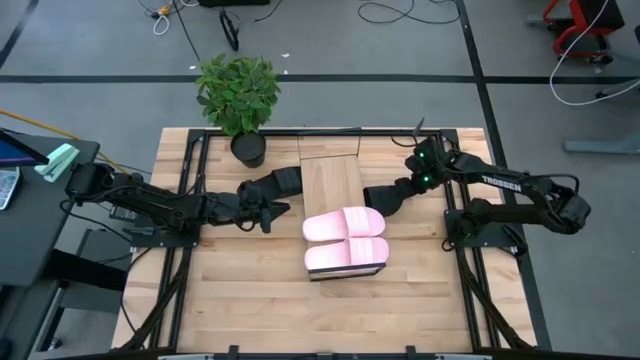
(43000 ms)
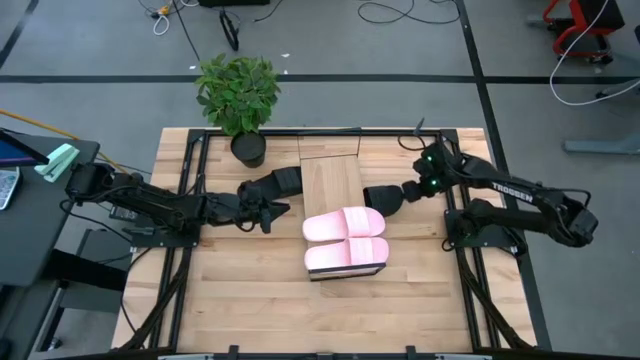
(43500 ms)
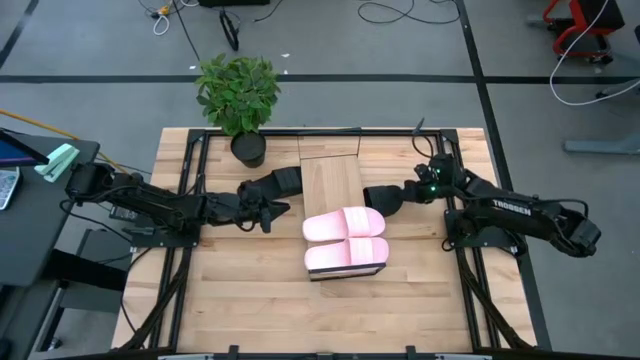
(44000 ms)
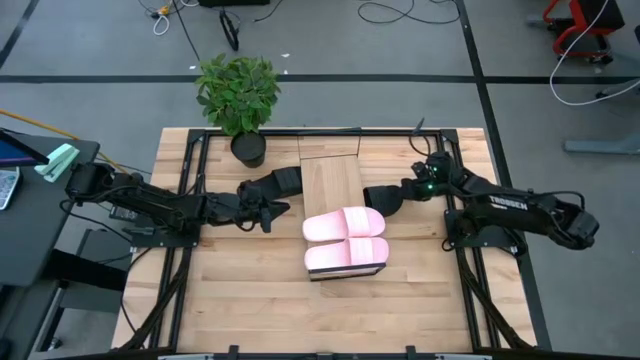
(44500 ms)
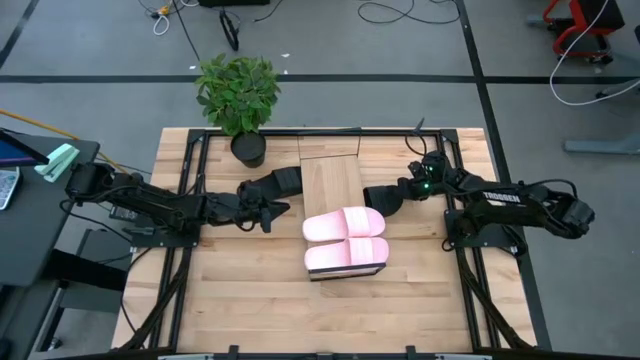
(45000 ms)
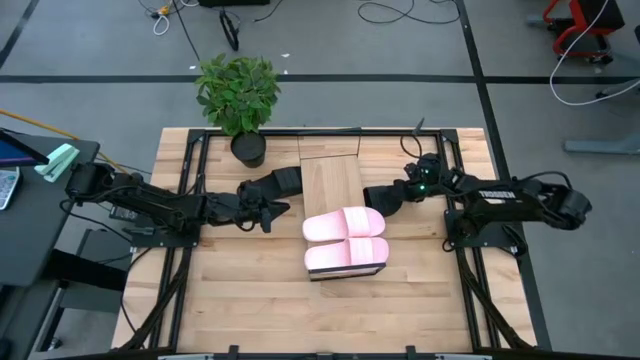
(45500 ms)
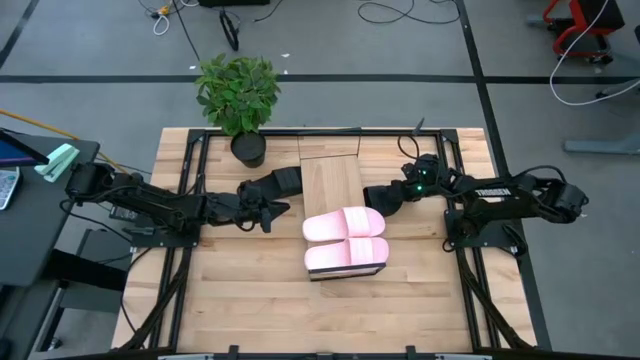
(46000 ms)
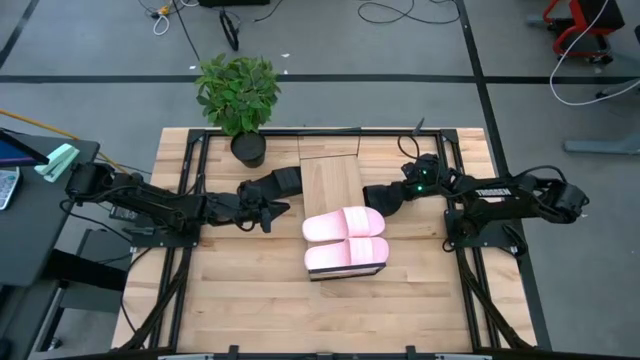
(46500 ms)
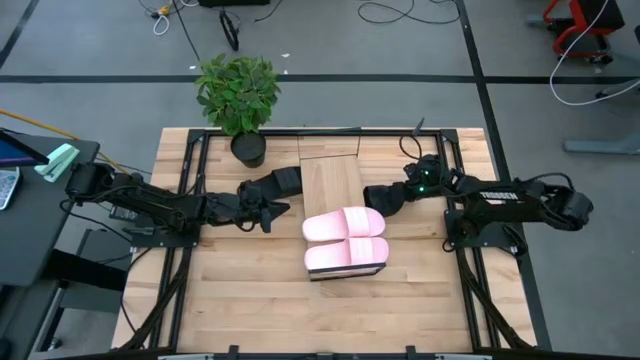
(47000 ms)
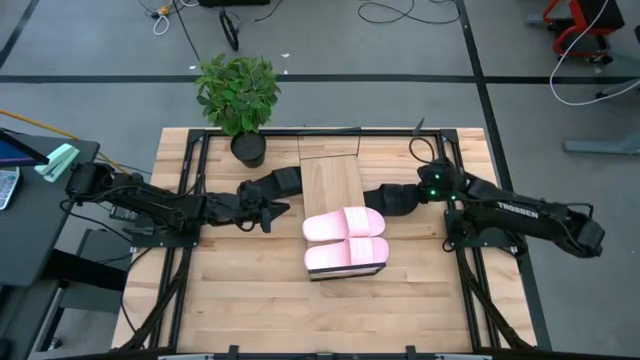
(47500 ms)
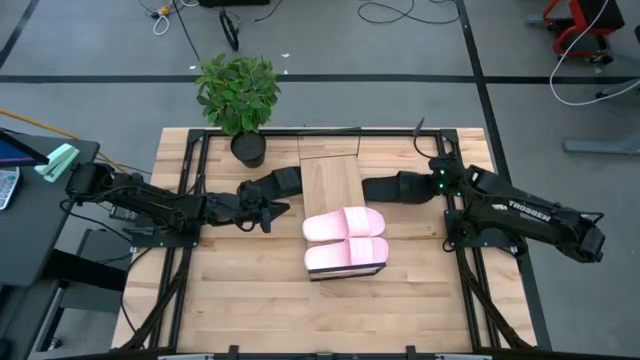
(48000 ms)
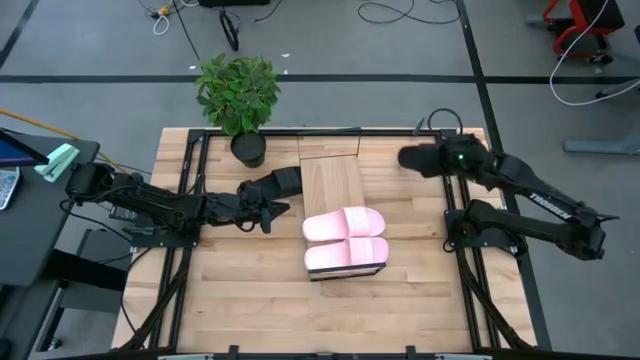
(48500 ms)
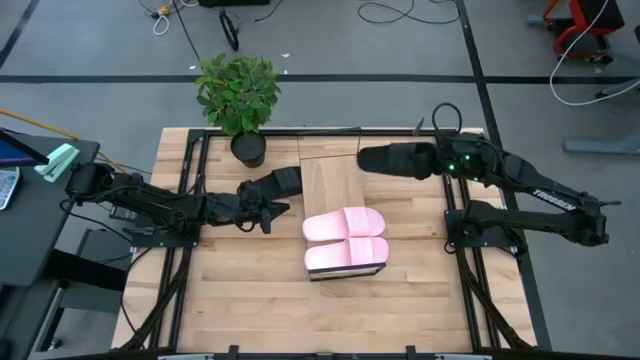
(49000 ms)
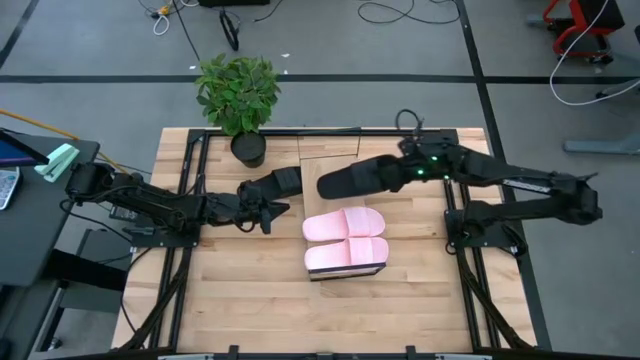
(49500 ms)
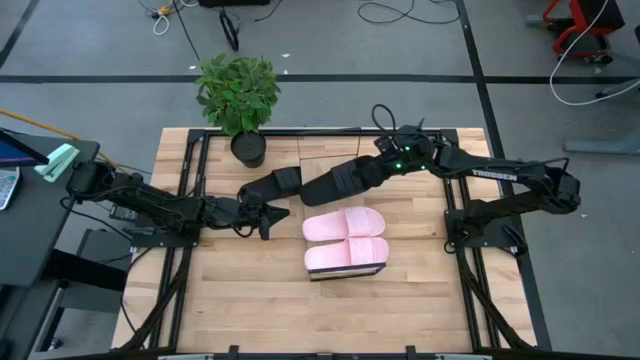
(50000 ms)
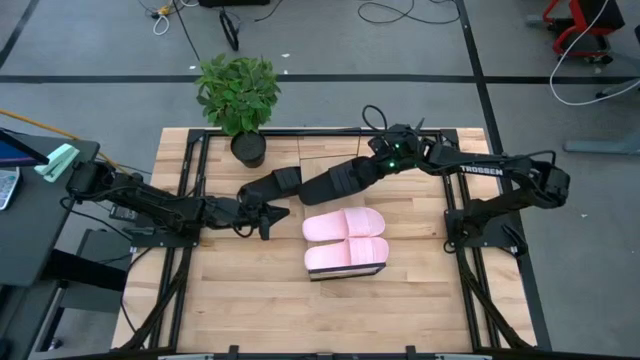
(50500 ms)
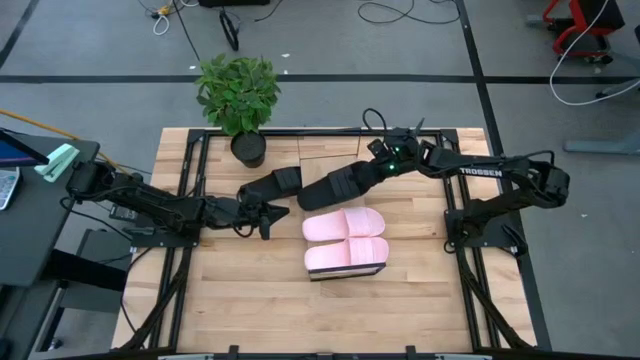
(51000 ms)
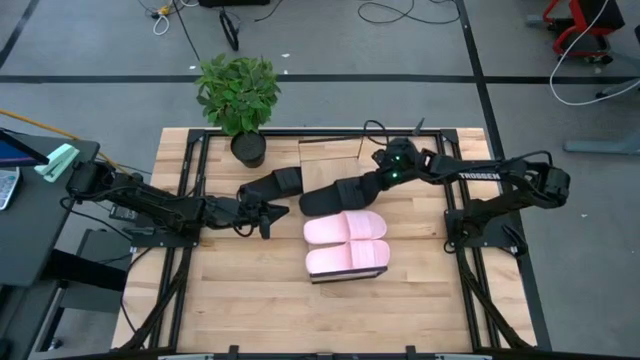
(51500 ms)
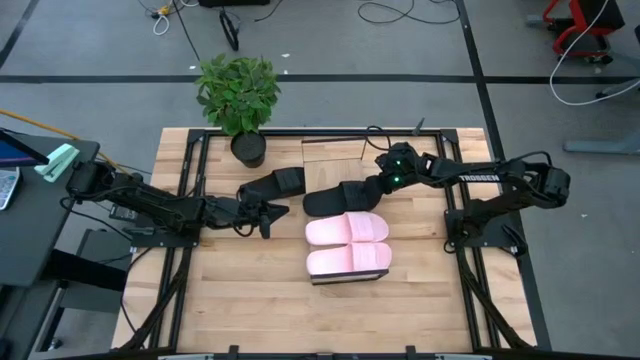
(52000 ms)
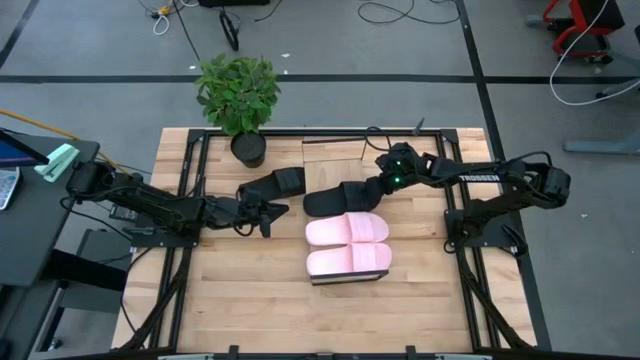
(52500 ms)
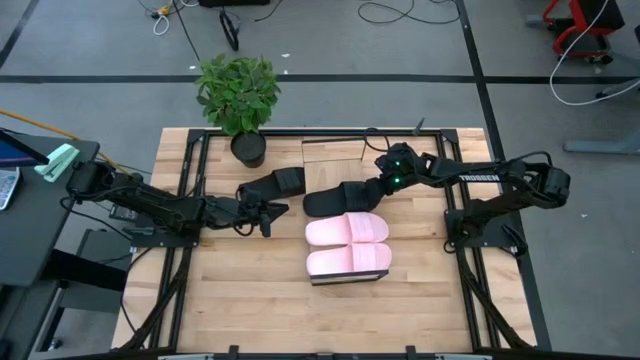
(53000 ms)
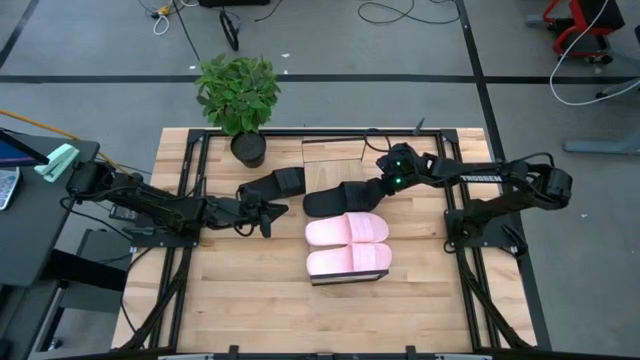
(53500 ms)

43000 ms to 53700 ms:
Task: Pick and place slides into the shelf
Put the right black slide on the shelf

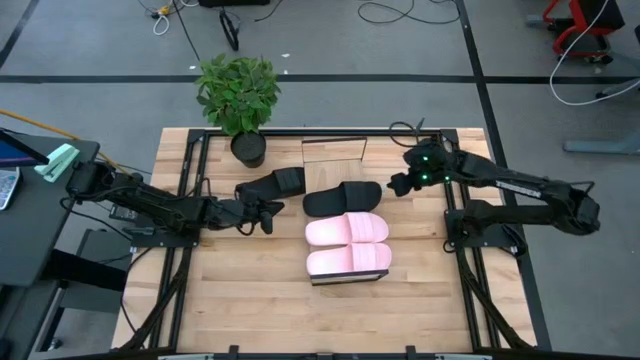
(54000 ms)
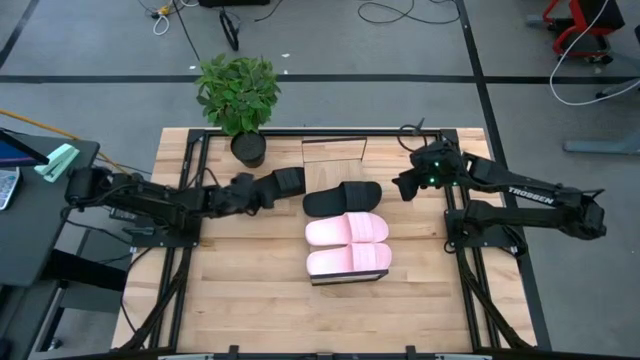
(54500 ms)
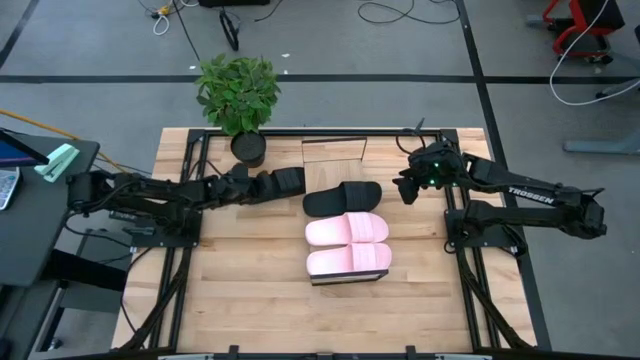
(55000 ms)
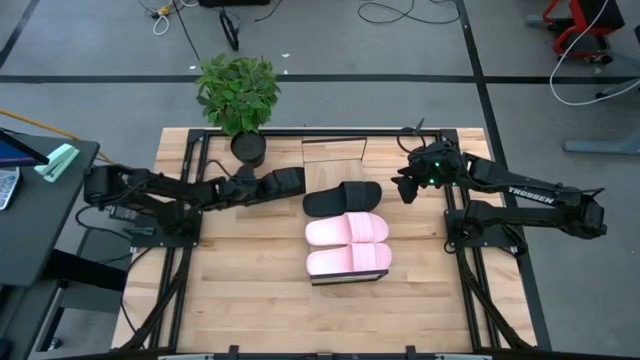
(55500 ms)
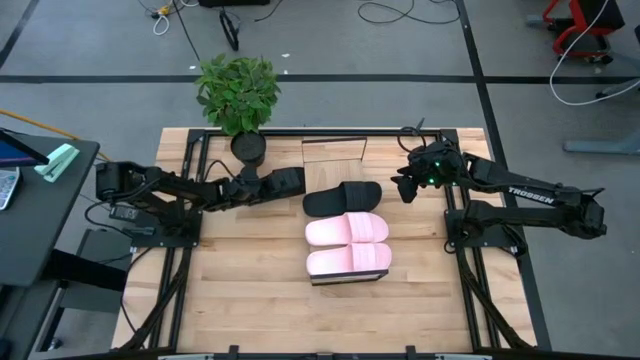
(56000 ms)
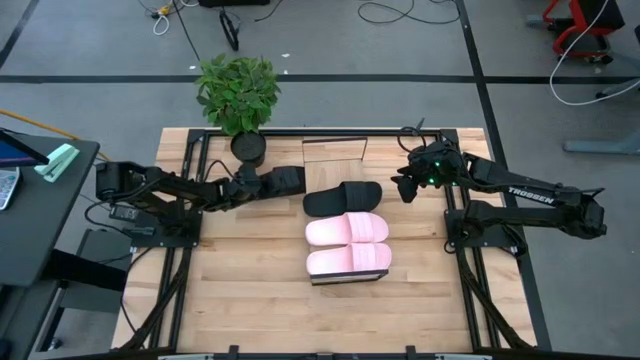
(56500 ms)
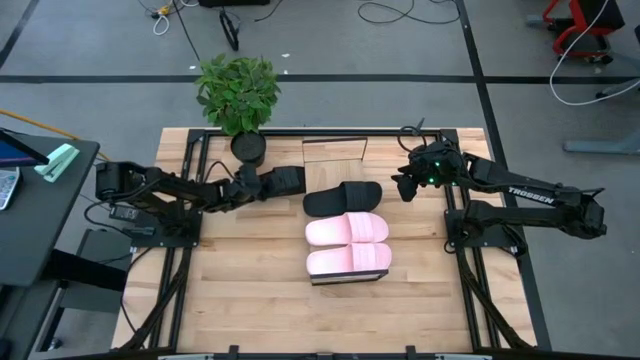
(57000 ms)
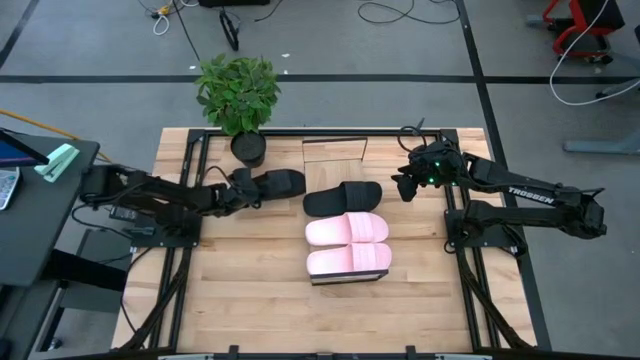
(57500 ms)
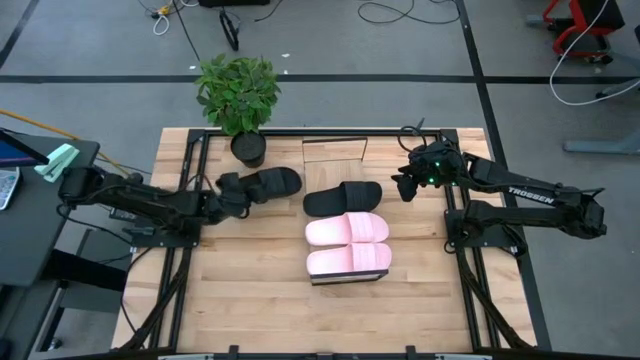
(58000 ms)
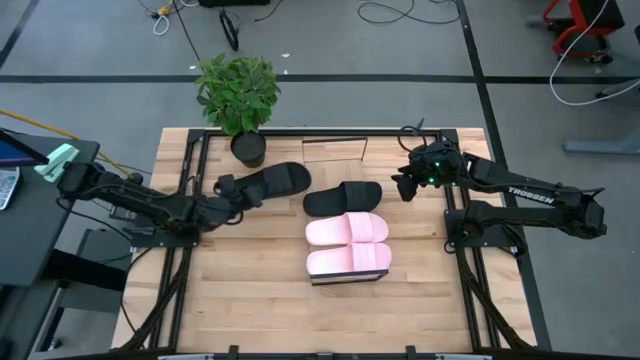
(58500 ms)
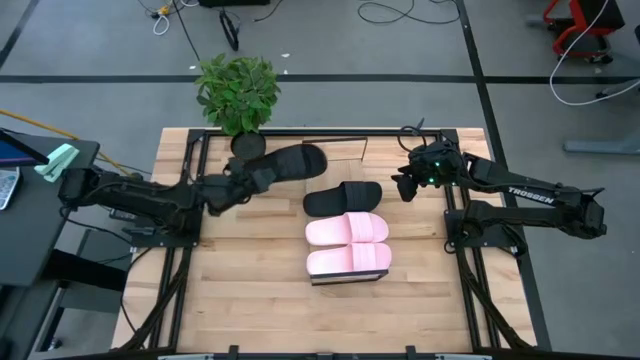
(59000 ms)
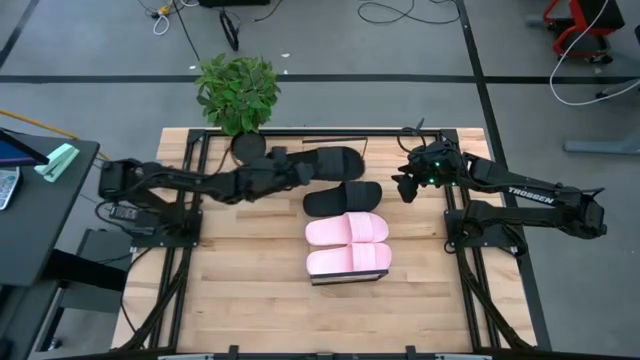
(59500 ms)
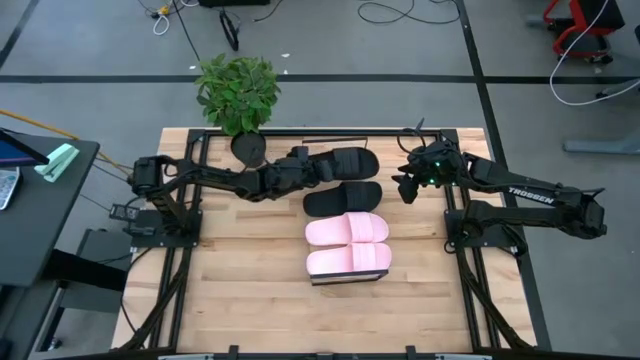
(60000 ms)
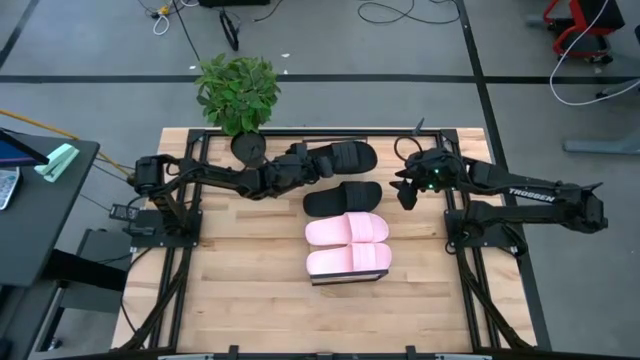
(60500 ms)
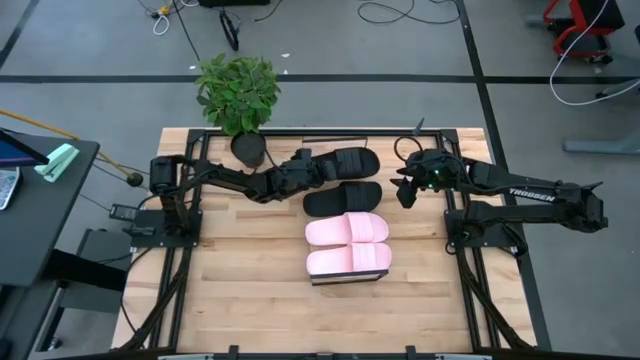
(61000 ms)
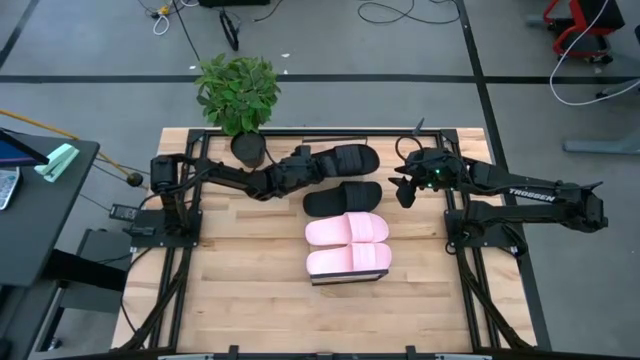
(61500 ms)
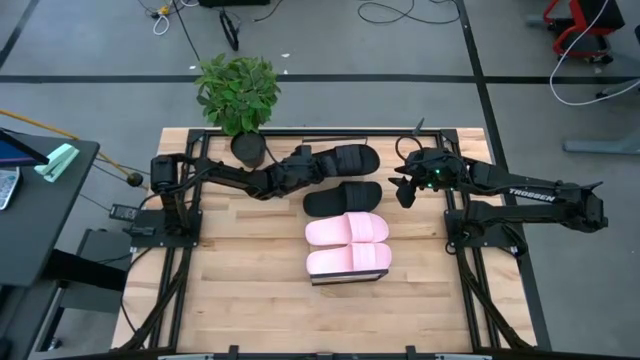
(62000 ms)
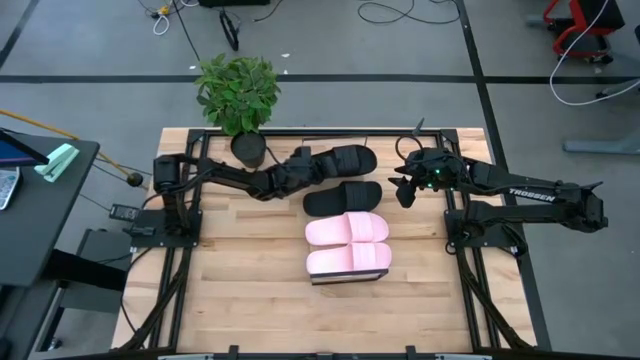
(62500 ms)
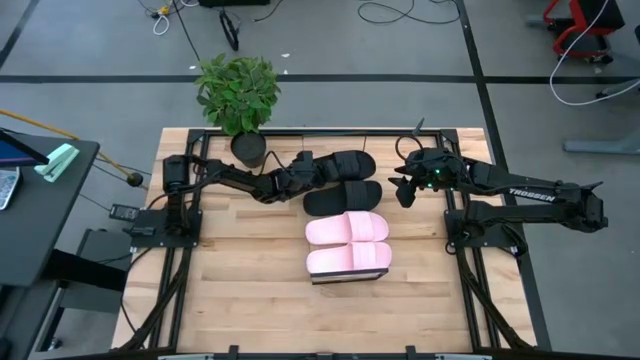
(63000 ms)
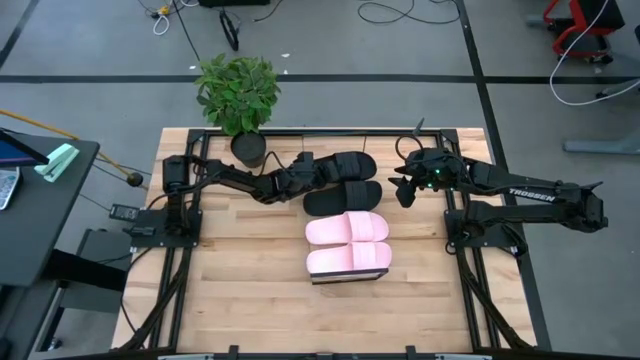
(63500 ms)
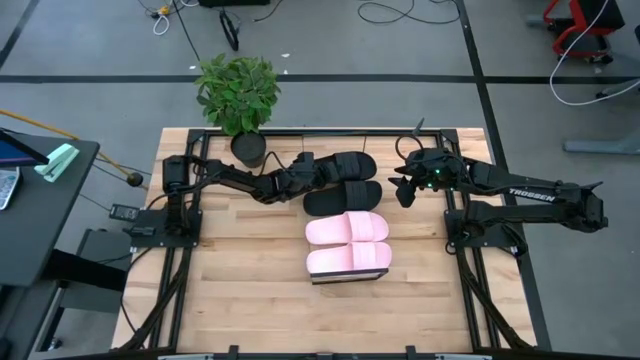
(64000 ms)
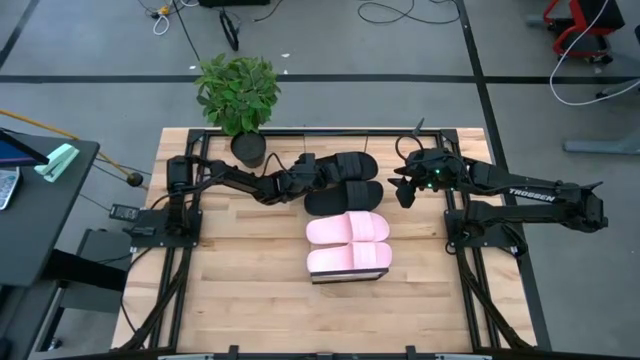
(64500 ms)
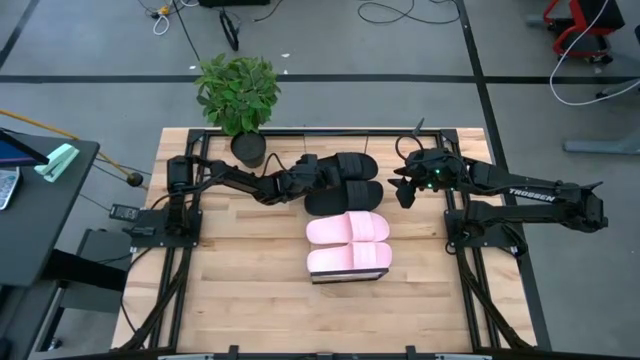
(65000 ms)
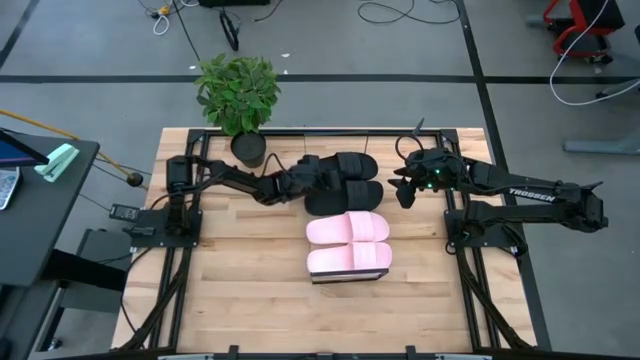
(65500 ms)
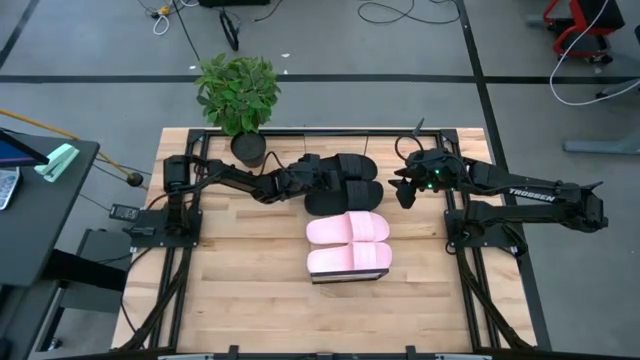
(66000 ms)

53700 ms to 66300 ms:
Put the black slide on the shelf
